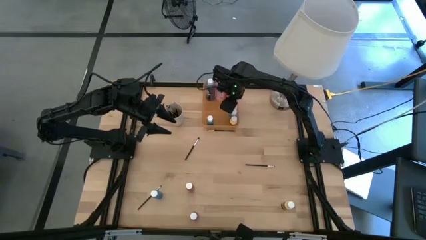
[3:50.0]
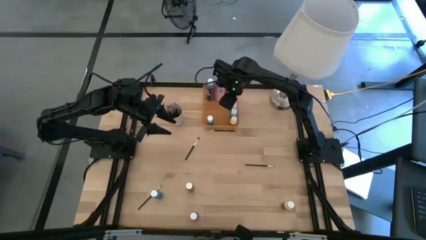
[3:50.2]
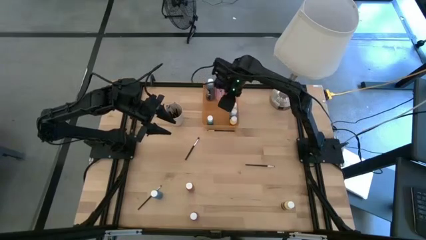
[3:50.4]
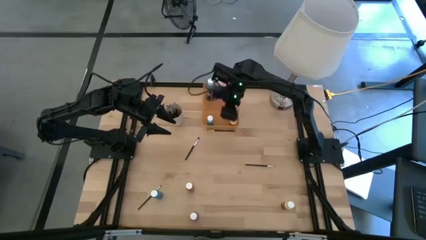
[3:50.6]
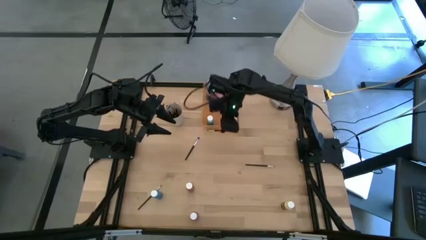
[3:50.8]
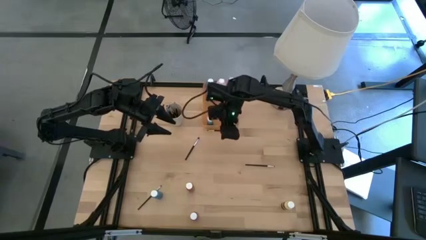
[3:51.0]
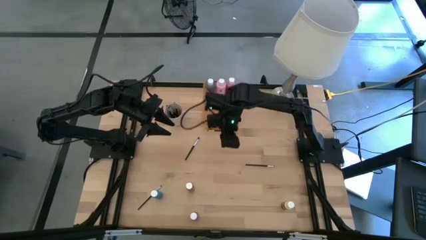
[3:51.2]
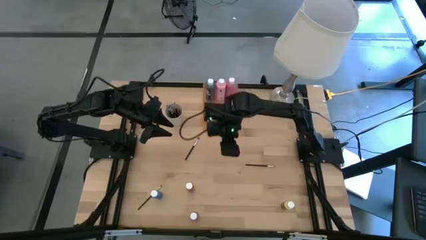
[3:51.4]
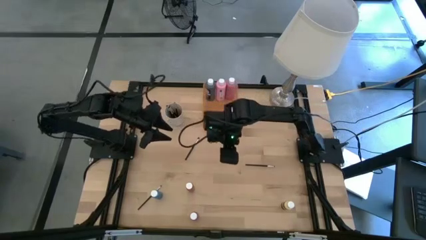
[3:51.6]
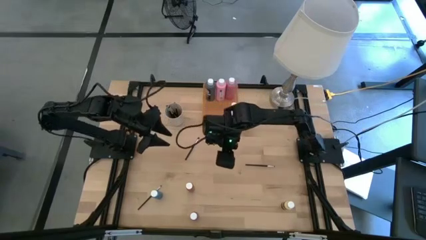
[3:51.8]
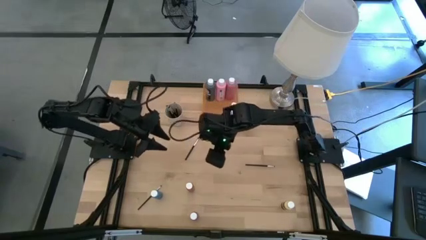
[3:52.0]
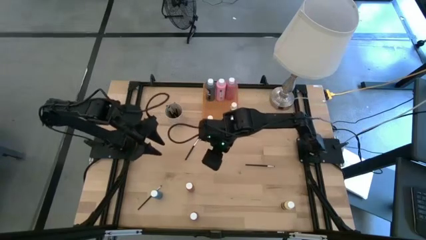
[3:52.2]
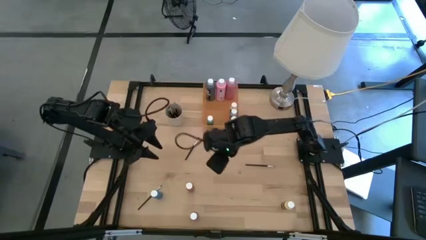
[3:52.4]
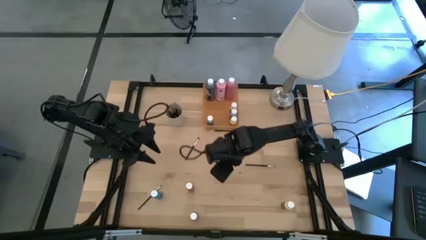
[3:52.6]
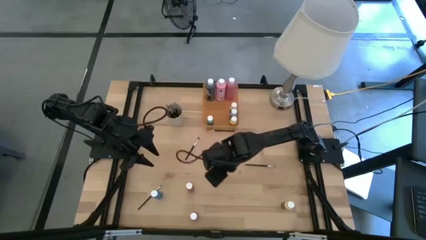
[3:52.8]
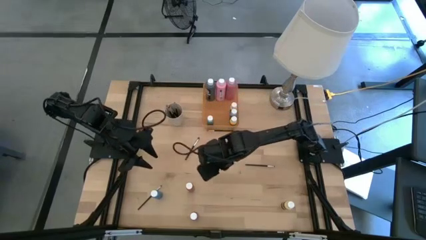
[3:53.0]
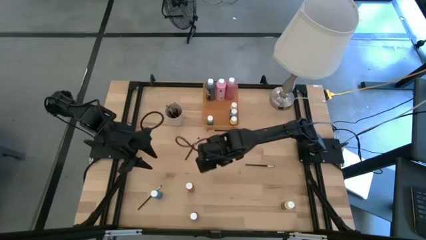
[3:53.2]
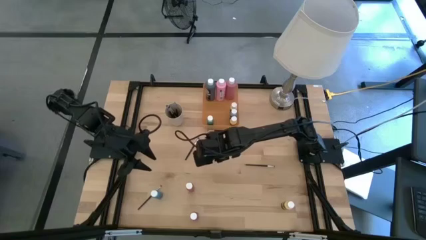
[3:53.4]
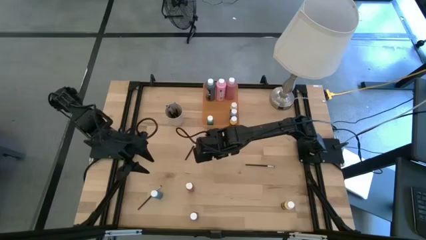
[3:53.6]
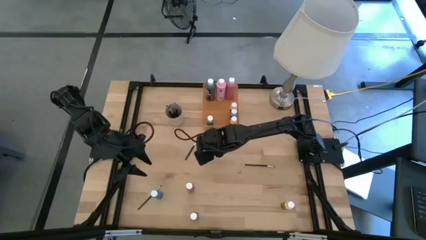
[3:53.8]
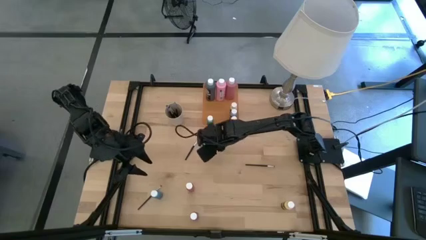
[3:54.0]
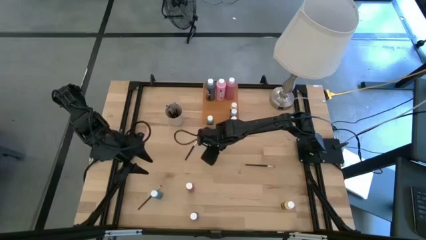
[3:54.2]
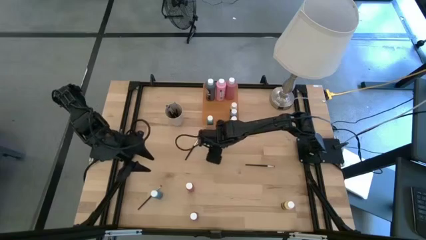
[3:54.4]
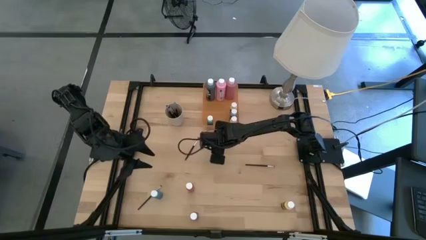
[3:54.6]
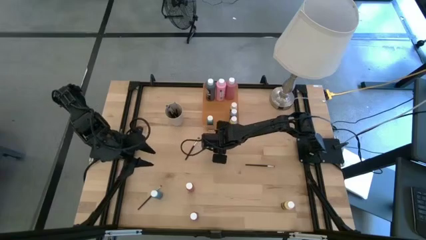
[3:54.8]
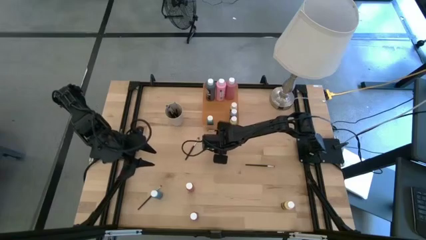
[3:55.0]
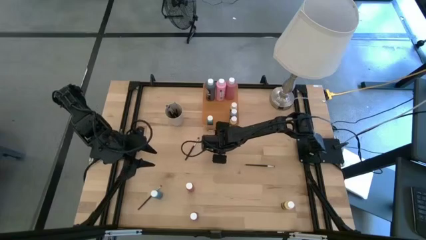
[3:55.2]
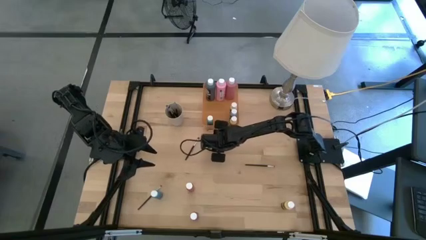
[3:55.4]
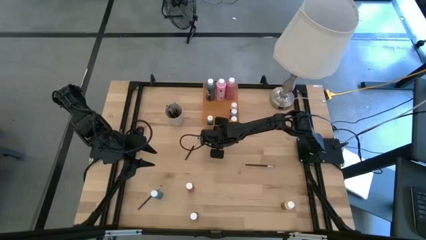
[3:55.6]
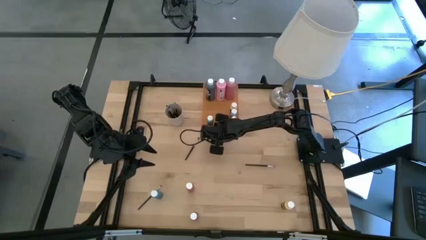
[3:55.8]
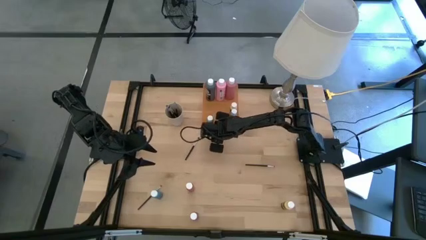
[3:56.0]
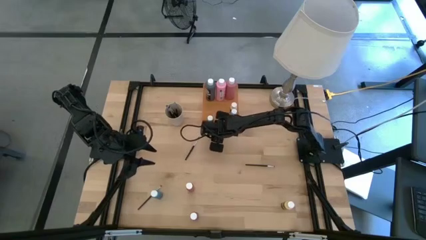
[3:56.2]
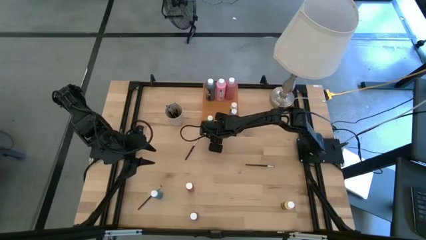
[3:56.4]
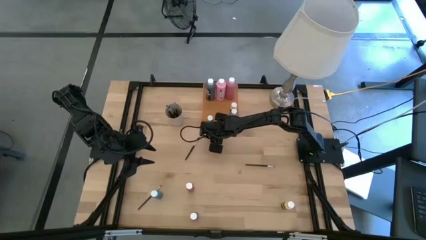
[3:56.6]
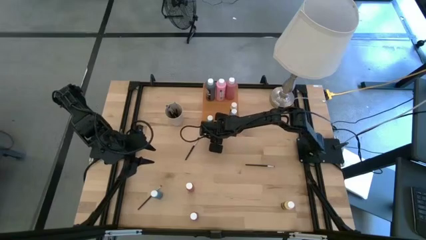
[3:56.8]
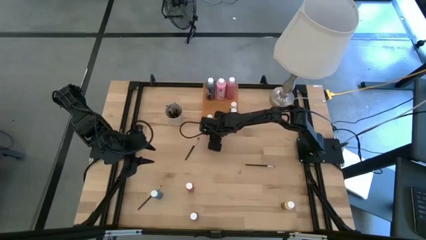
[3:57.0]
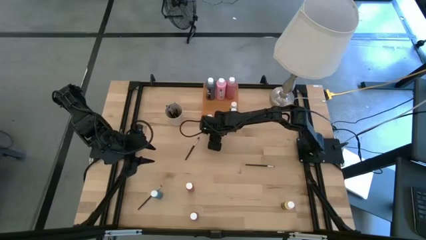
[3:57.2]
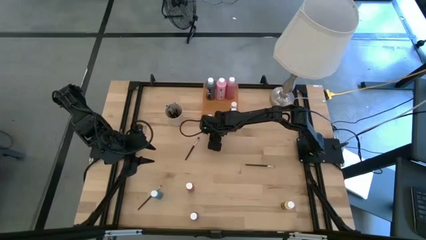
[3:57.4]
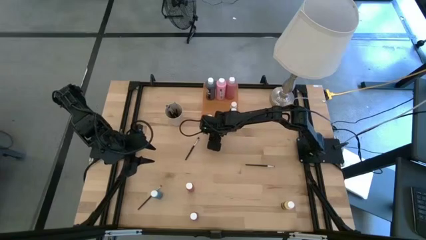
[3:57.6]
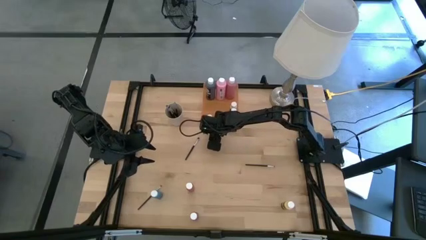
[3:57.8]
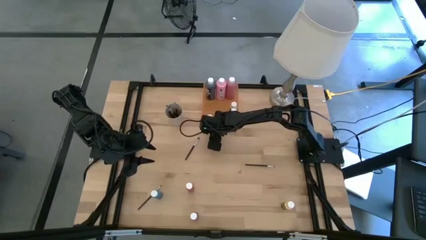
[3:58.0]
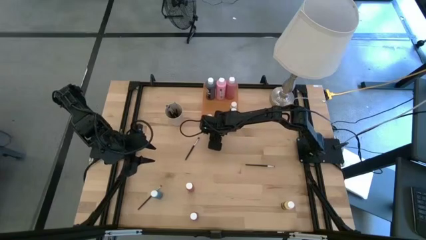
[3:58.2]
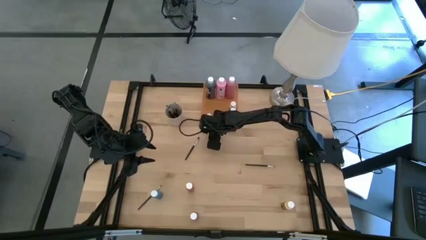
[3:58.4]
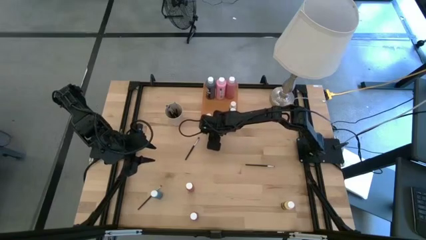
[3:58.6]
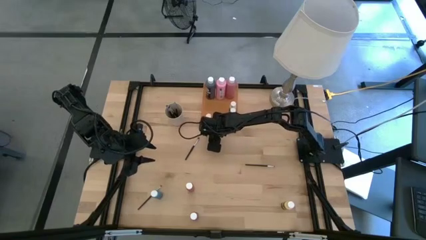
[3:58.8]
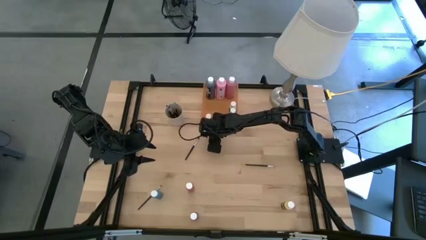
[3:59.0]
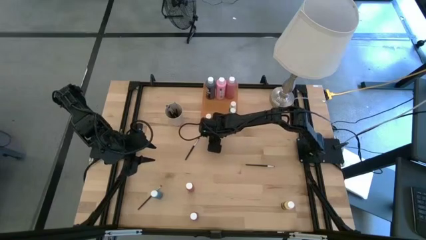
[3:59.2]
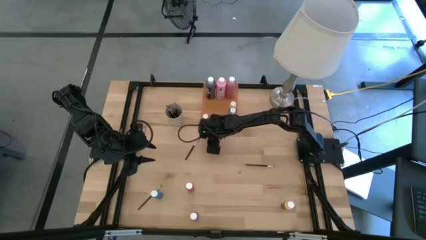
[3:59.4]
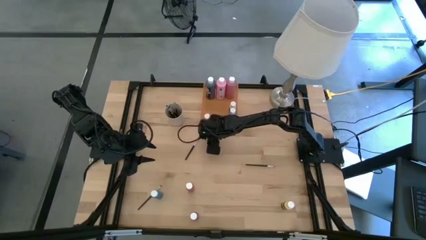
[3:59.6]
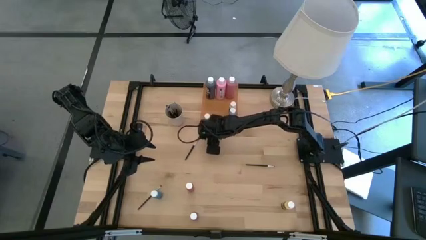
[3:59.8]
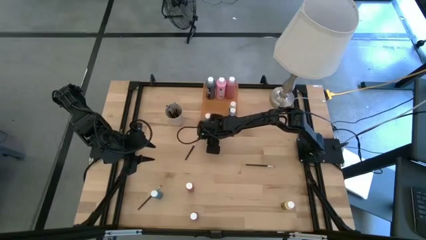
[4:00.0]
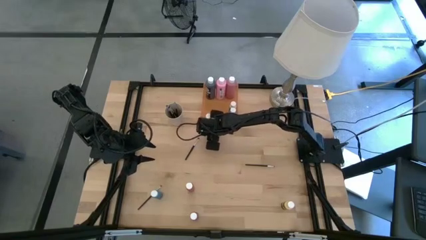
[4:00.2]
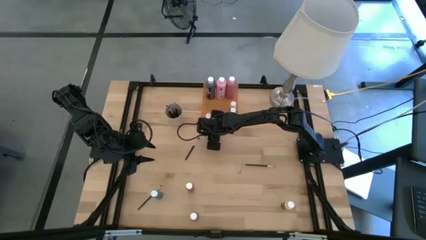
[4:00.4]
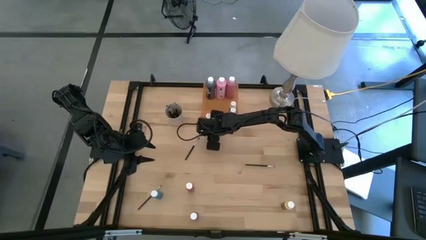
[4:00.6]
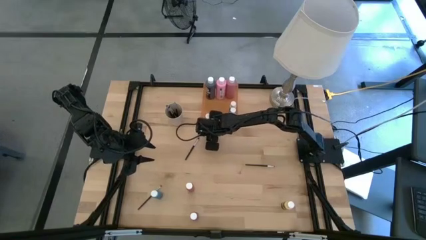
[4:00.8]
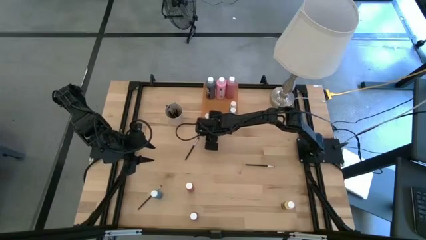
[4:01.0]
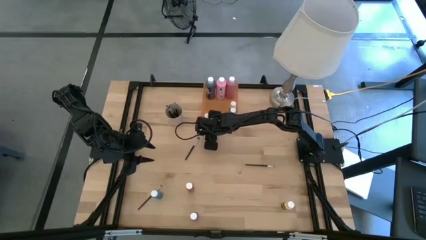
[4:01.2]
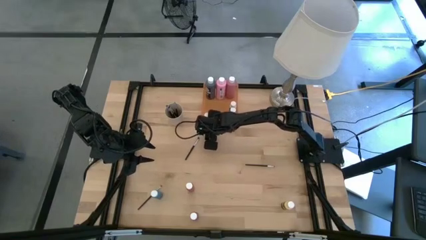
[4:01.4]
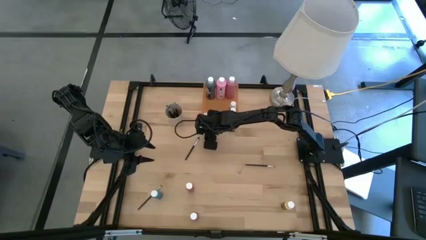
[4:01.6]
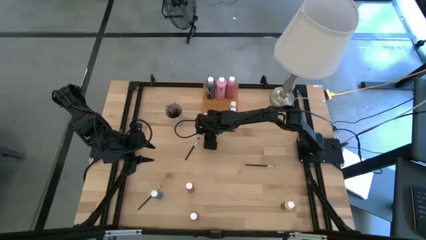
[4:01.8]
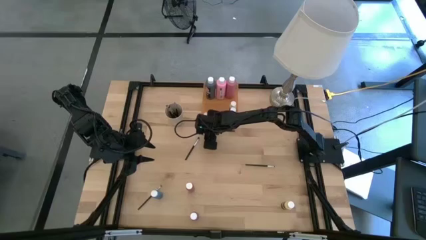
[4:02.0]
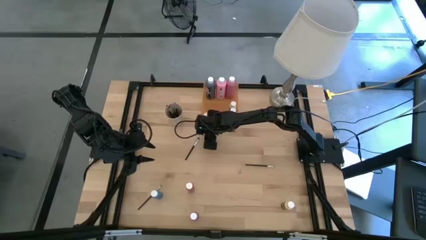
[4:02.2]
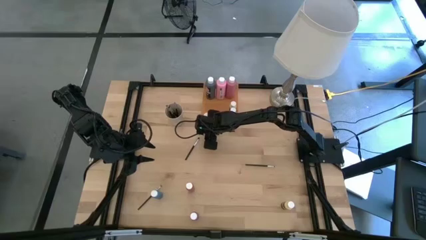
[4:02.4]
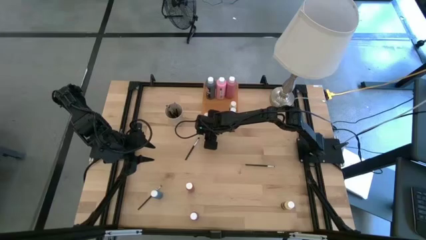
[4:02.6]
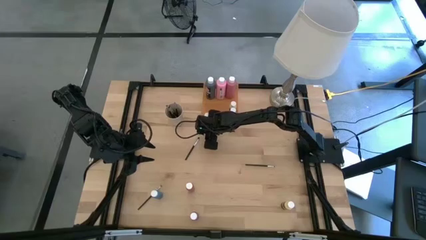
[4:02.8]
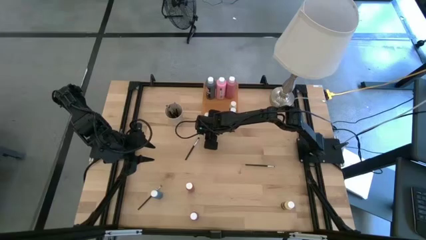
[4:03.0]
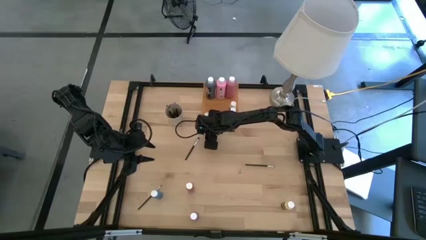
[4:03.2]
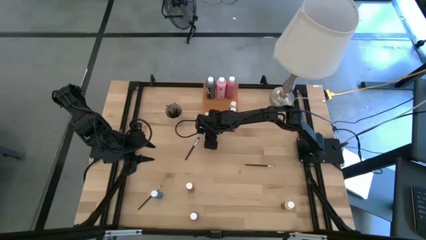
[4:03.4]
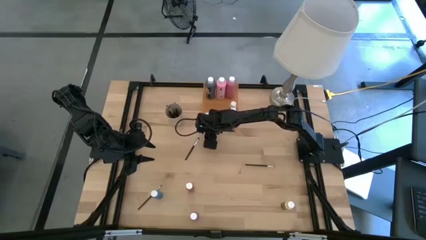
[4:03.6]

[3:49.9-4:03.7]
Task: Pick & Place Paint Supplies
Put the black paint brush into the white cup

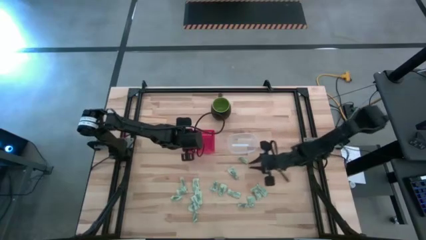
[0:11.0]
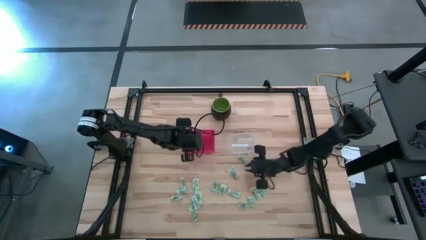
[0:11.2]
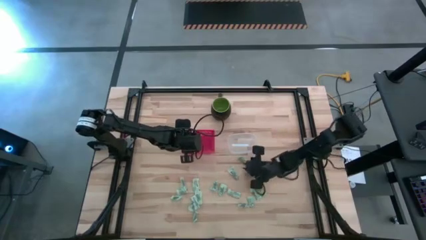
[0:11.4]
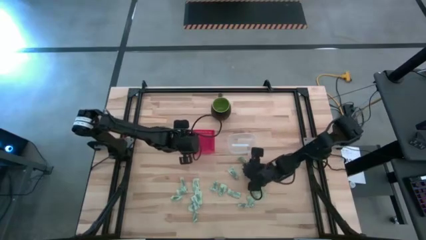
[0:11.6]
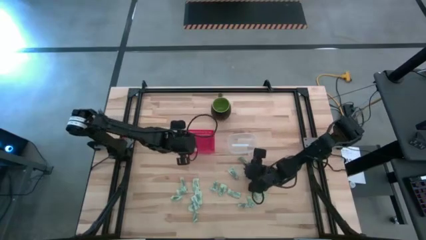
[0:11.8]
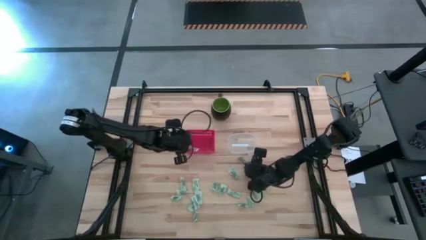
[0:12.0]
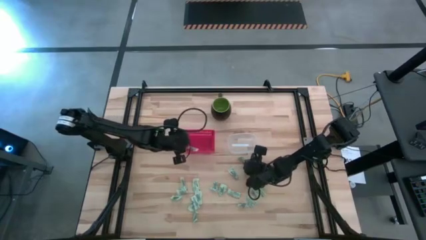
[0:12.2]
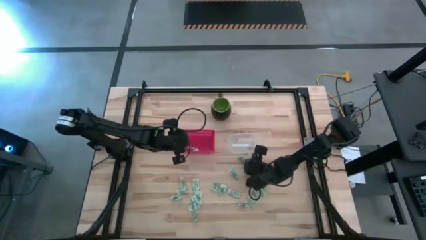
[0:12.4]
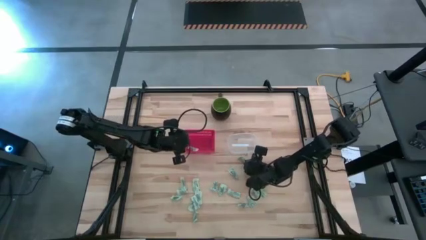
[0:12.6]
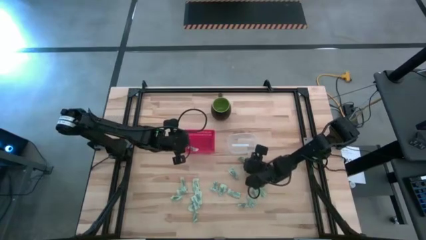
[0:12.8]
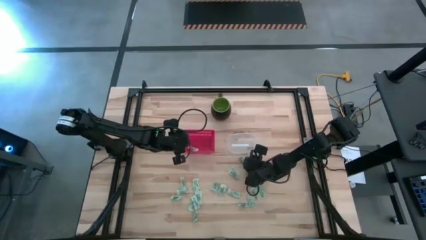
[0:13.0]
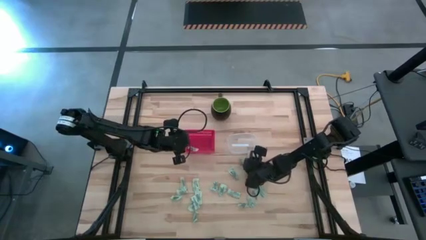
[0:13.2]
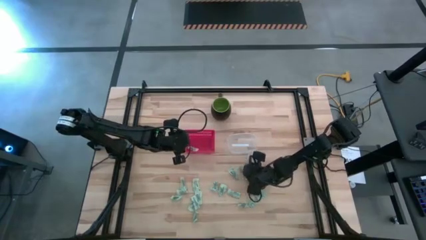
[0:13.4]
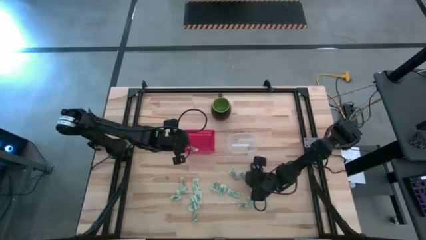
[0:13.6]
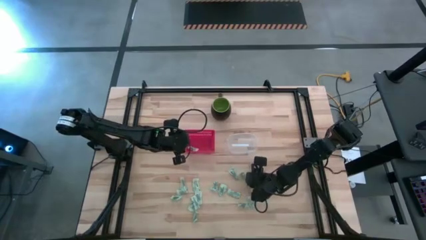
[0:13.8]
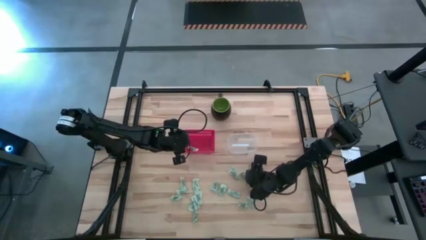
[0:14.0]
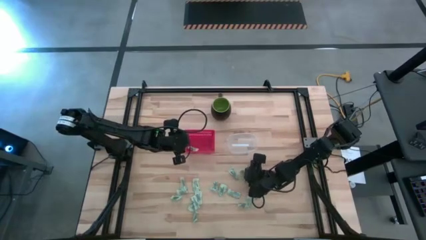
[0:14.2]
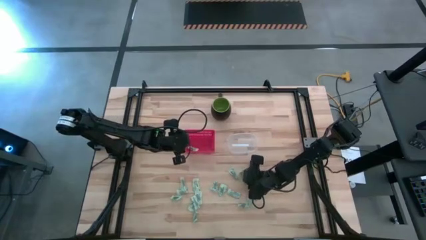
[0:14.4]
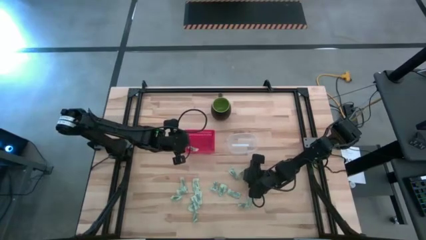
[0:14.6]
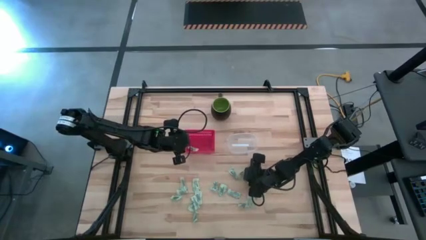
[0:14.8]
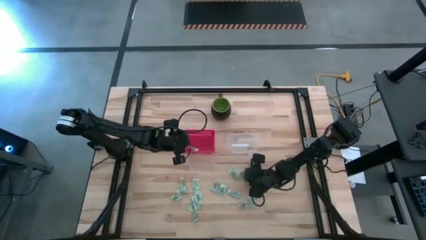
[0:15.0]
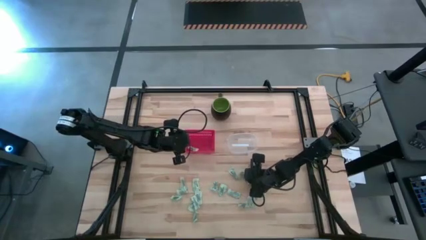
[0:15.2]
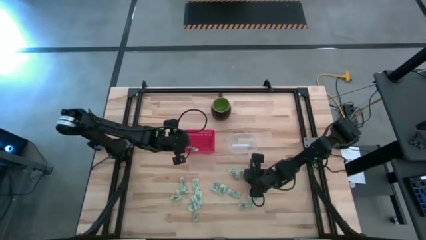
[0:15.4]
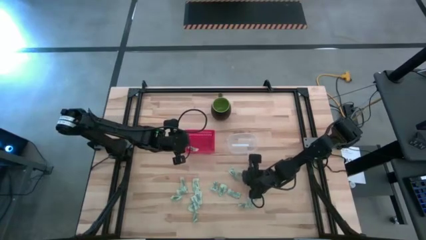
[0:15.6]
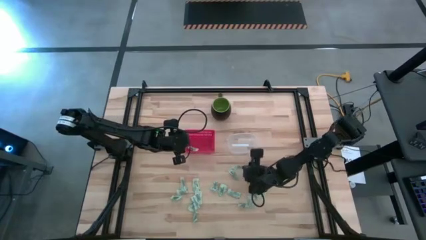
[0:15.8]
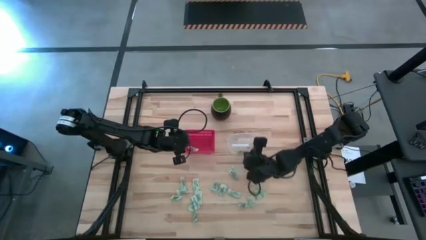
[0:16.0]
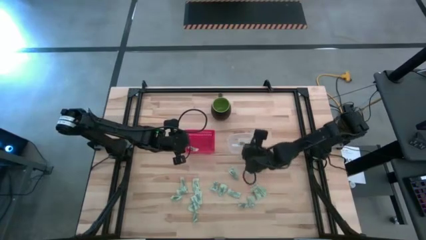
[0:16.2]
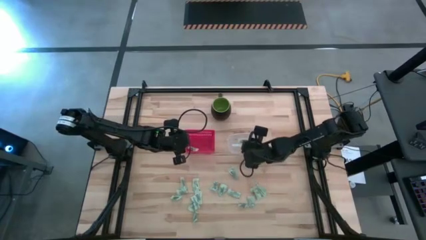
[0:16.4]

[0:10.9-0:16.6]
Task: Pick and place items into bin
Put the stevia packet into the transparent bin
